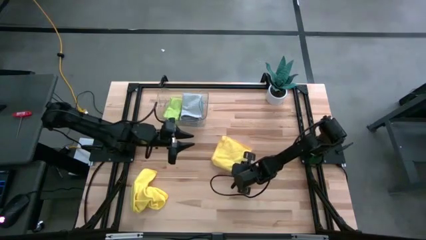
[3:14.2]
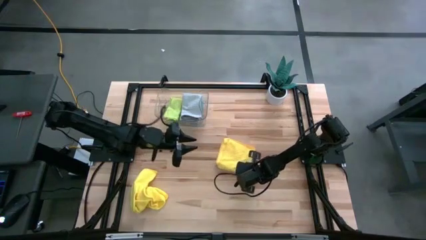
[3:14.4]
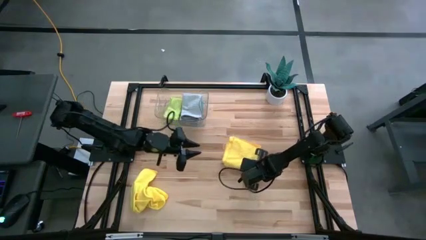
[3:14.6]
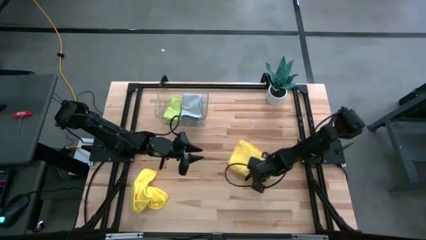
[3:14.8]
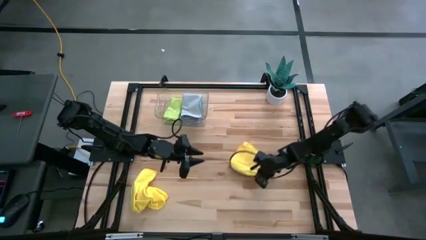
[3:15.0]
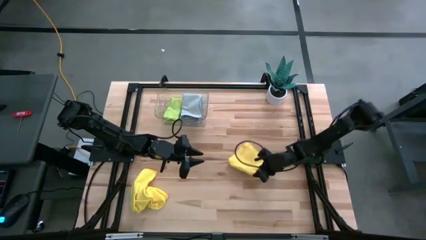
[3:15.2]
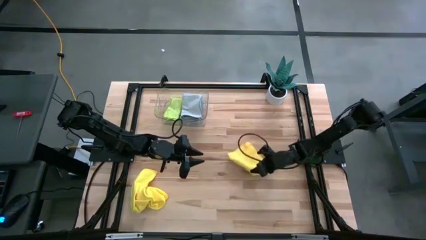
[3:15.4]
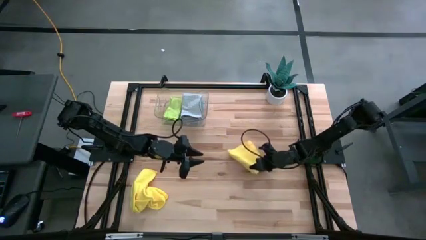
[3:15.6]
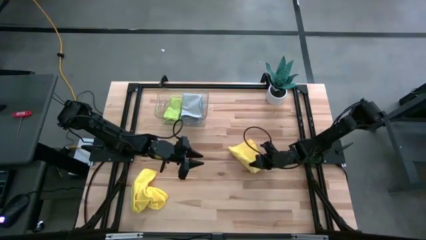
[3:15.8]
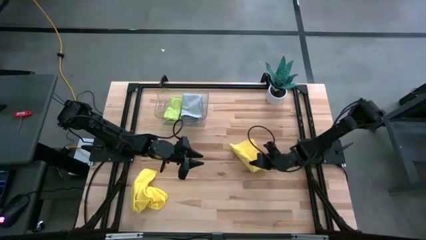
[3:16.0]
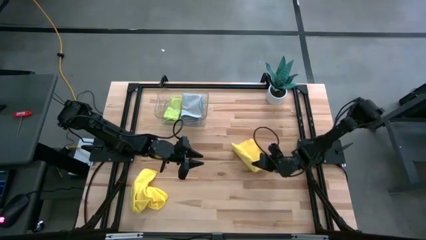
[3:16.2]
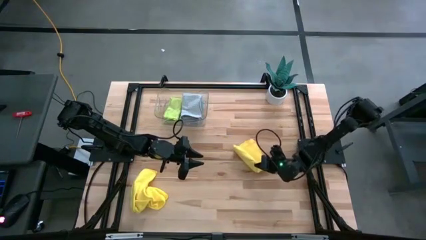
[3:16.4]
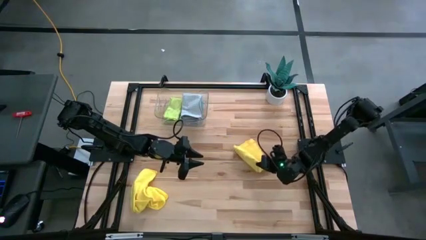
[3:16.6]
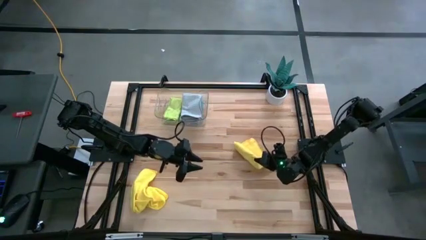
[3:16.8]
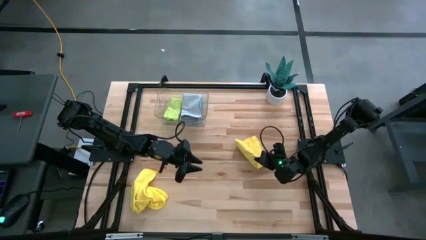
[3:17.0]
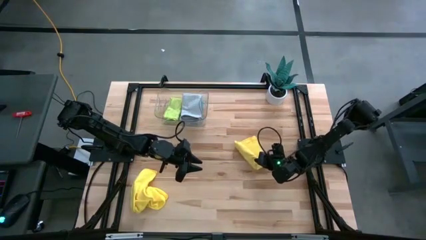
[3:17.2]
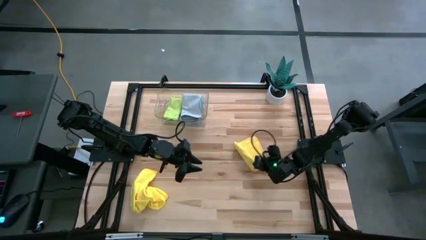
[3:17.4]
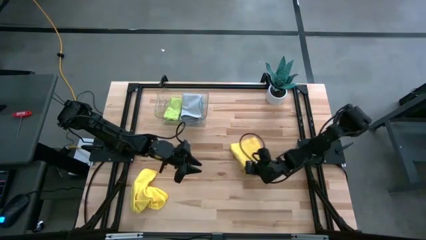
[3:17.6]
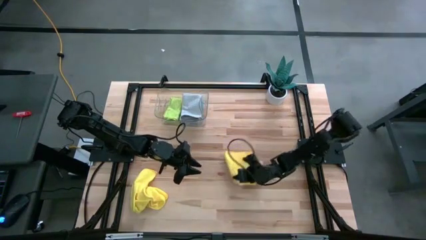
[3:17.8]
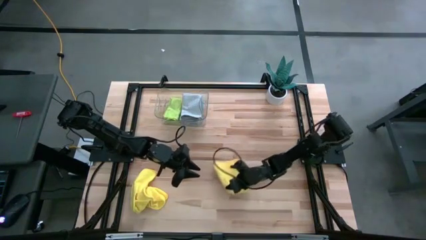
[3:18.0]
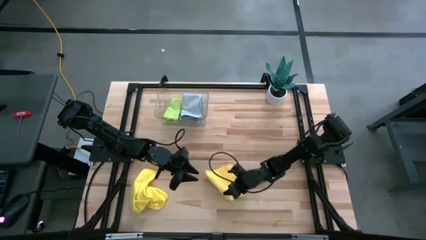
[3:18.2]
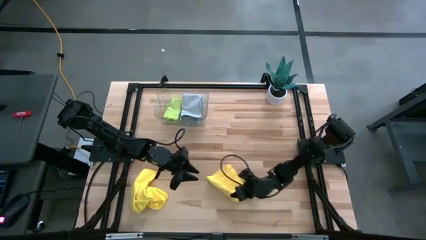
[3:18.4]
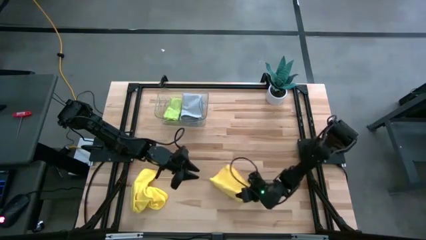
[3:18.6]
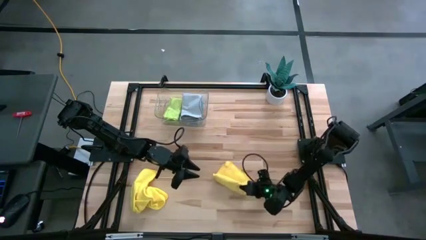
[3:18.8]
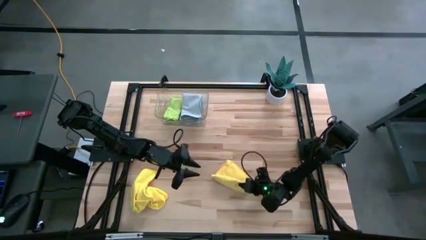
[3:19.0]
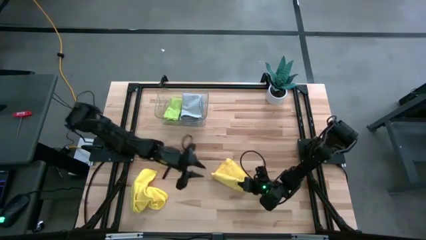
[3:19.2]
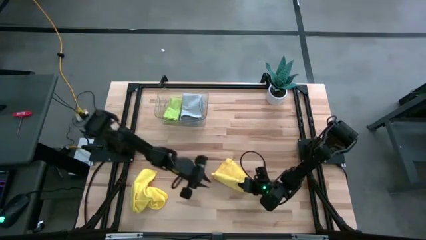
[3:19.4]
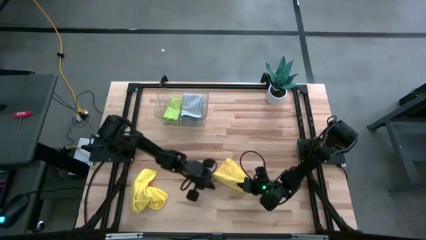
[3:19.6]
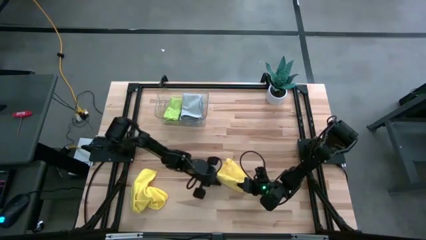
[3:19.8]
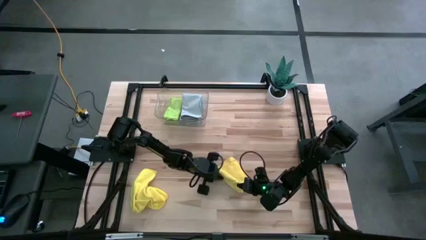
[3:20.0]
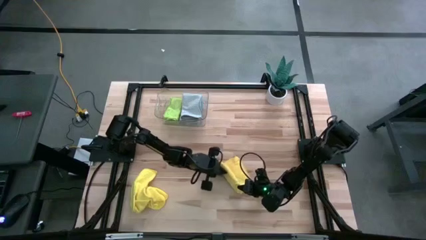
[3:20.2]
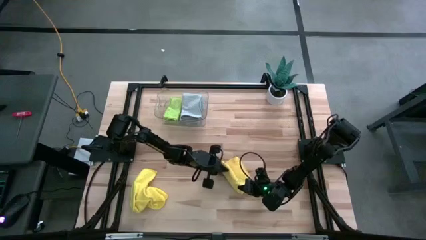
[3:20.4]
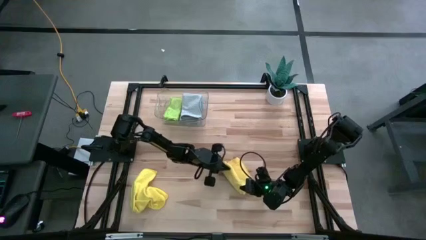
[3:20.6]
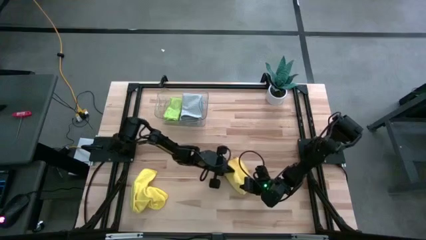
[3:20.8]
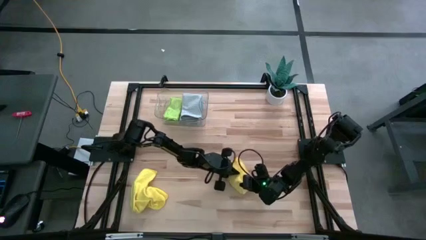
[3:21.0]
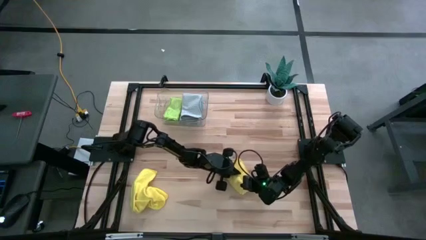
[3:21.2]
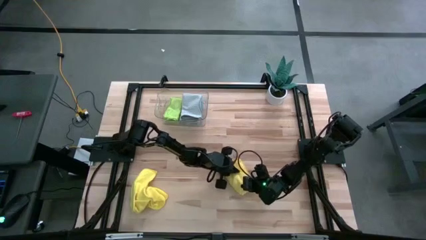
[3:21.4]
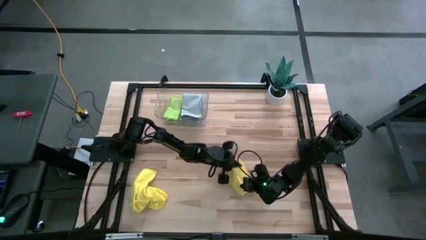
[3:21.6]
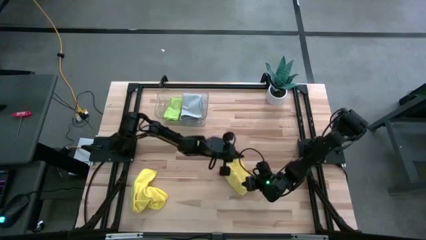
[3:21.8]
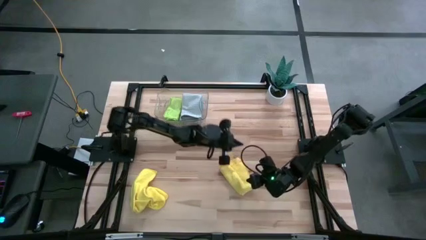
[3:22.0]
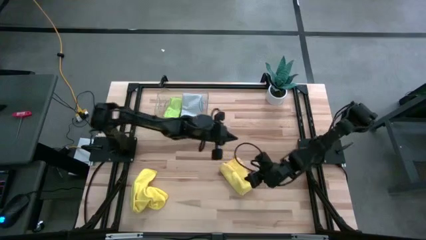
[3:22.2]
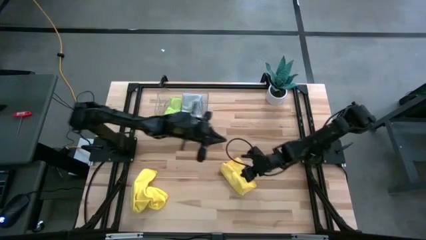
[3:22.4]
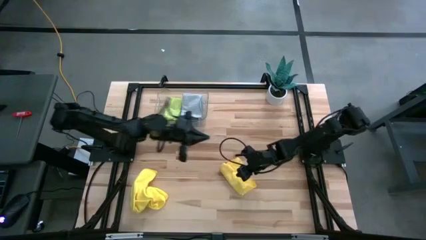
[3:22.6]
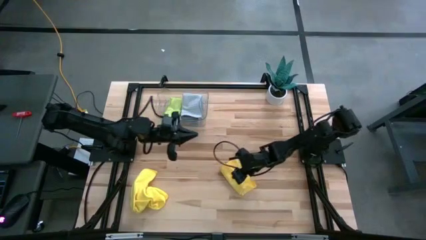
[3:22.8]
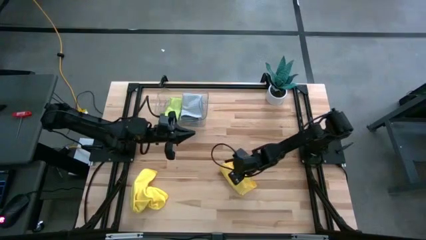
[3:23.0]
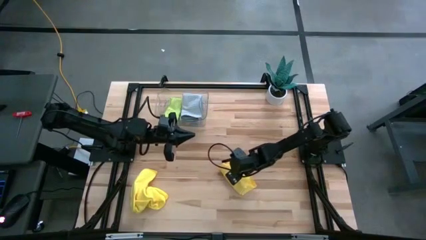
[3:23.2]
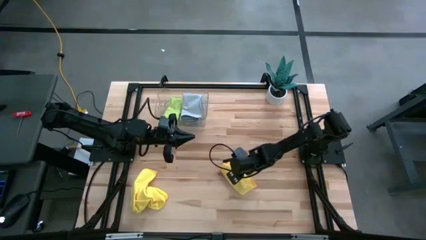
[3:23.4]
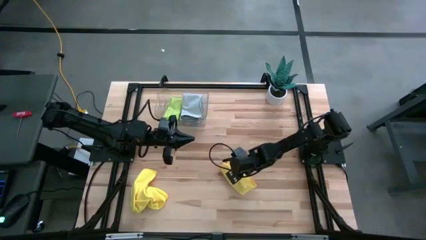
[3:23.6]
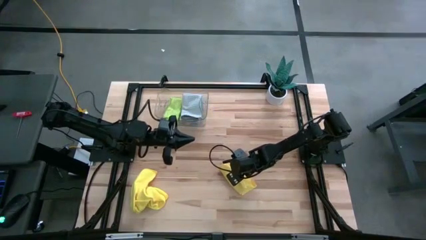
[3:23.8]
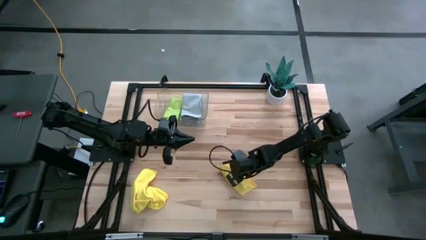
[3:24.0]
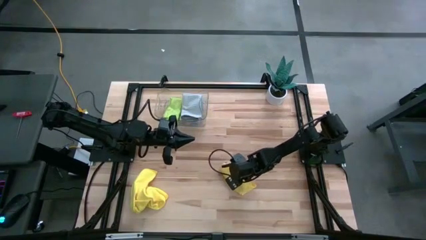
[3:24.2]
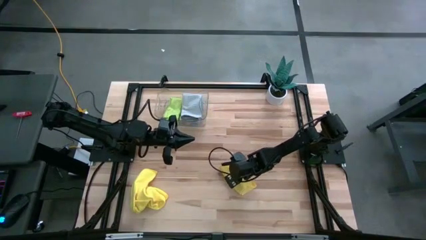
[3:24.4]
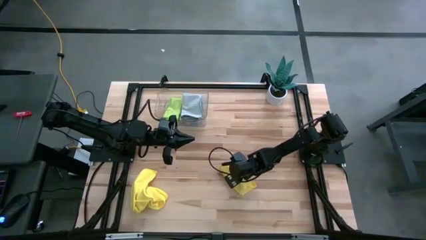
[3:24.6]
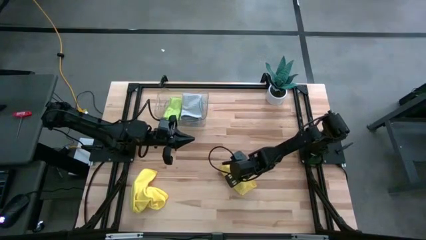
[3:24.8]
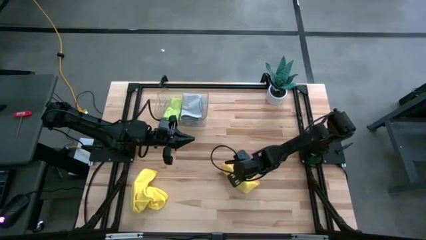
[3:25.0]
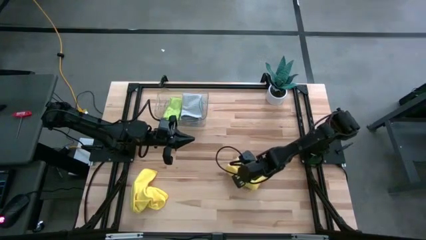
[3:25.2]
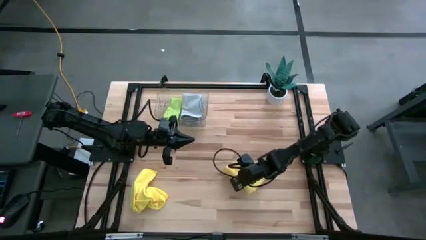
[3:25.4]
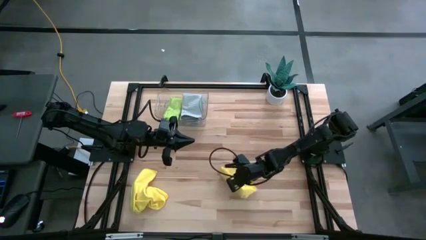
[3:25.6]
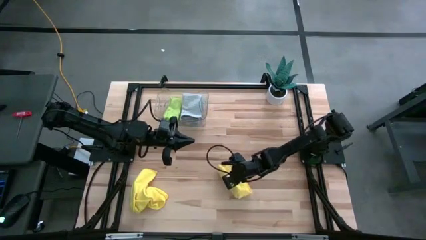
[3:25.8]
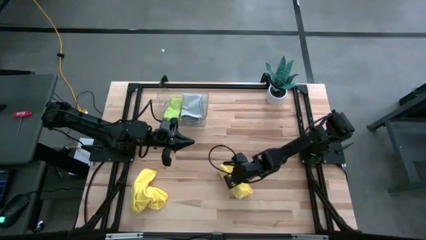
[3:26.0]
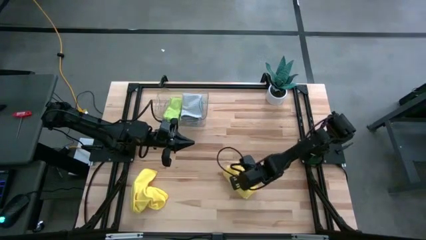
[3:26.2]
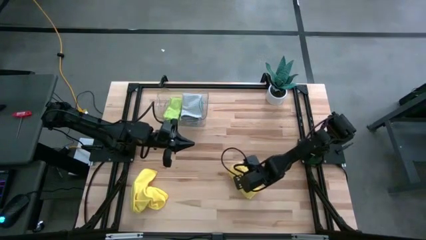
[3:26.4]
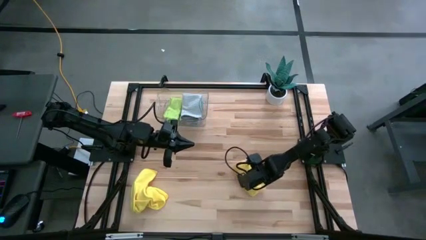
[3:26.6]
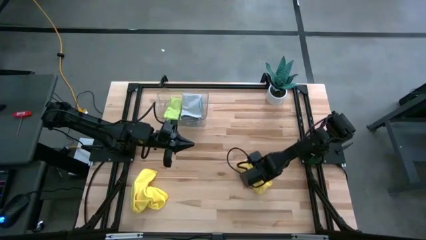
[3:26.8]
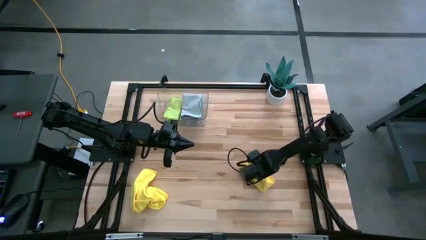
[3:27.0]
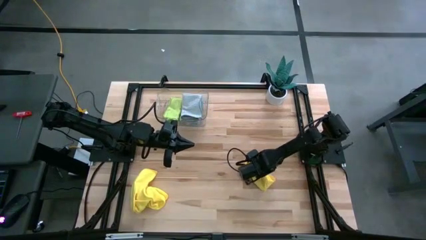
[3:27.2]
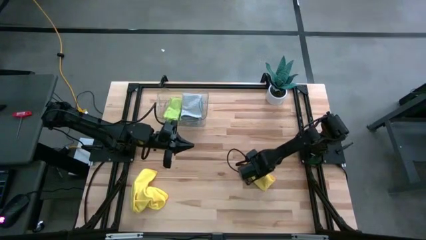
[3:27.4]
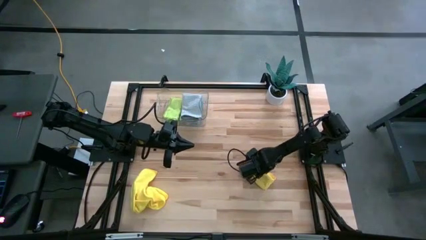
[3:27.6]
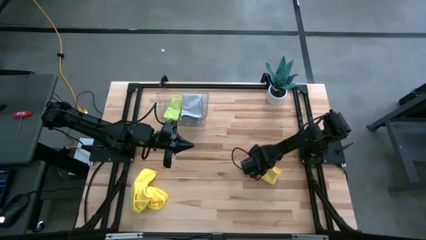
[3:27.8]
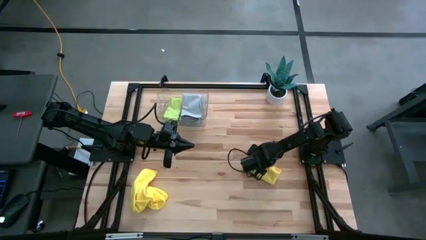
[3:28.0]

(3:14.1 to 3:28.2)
Task: Fold microfiber towels
Fold the top yellow towel
